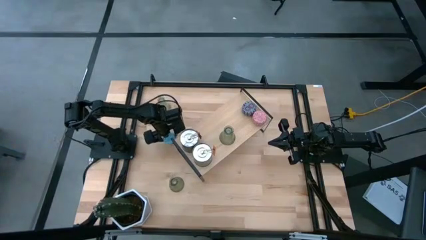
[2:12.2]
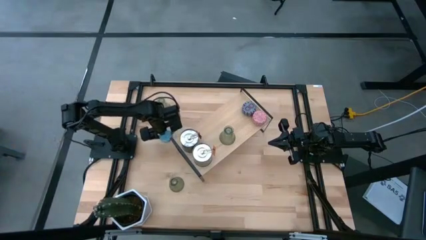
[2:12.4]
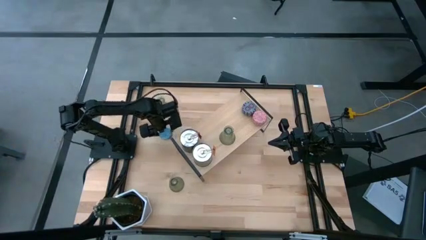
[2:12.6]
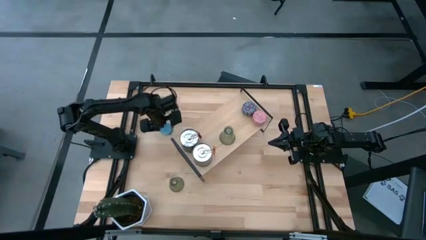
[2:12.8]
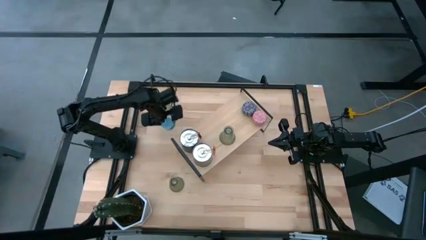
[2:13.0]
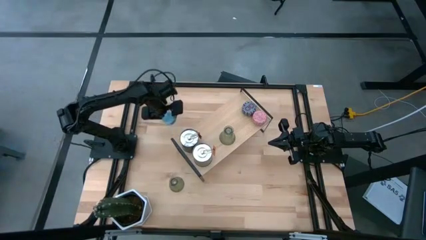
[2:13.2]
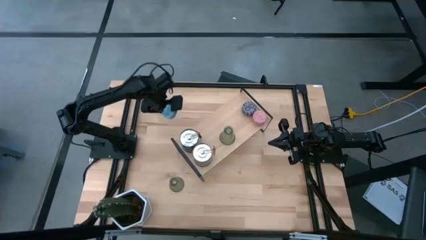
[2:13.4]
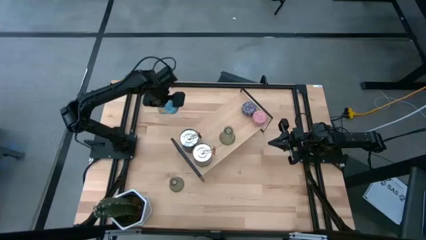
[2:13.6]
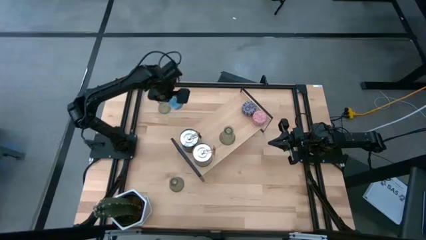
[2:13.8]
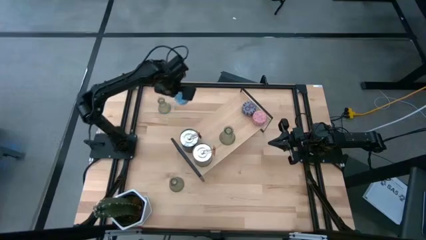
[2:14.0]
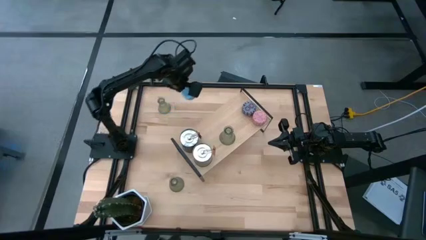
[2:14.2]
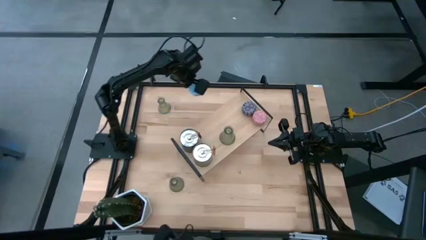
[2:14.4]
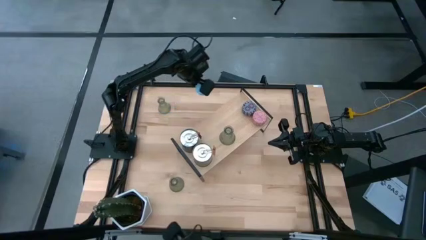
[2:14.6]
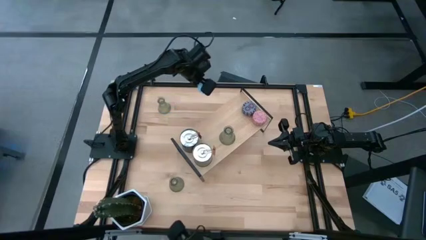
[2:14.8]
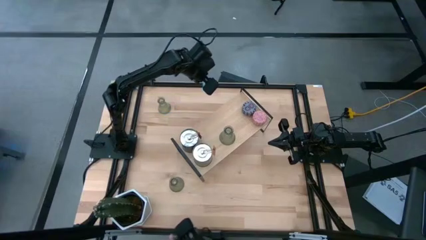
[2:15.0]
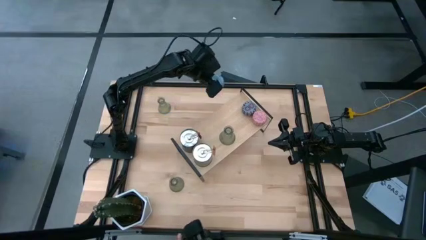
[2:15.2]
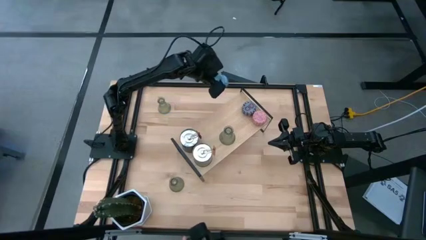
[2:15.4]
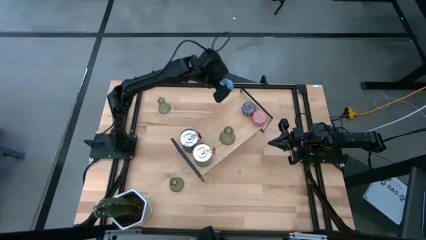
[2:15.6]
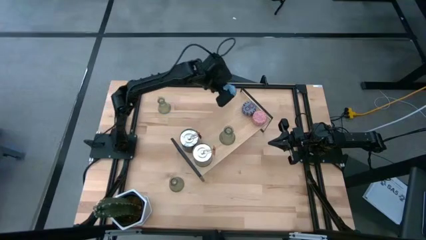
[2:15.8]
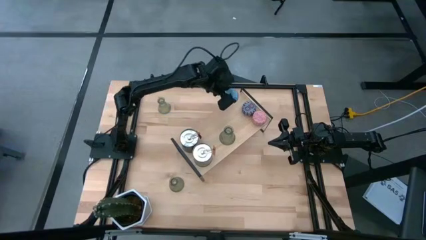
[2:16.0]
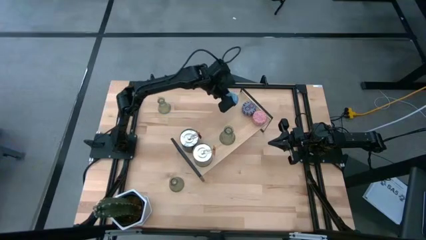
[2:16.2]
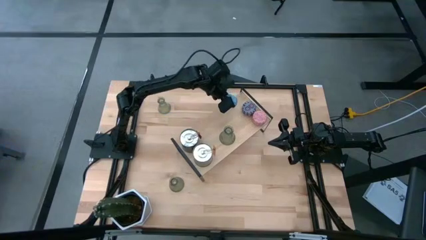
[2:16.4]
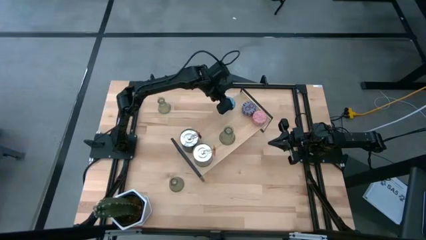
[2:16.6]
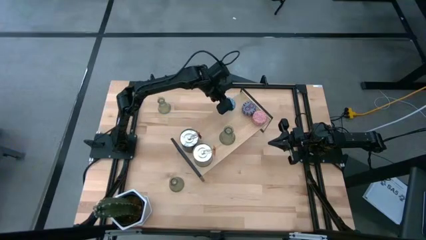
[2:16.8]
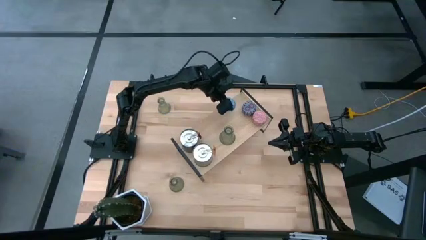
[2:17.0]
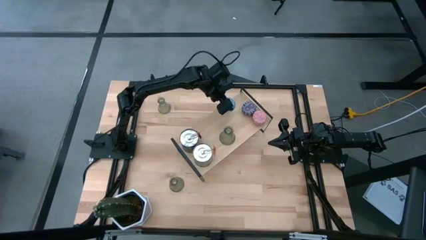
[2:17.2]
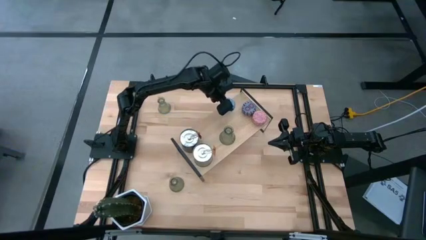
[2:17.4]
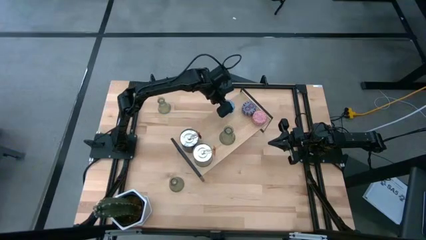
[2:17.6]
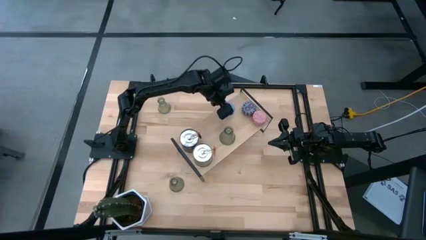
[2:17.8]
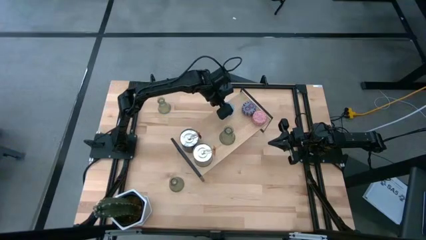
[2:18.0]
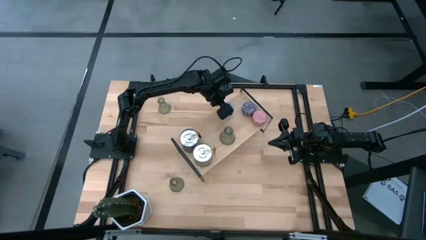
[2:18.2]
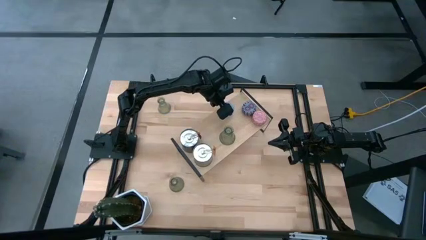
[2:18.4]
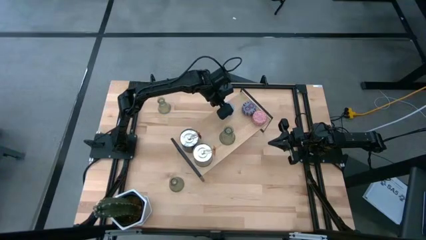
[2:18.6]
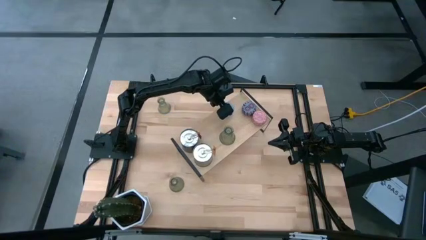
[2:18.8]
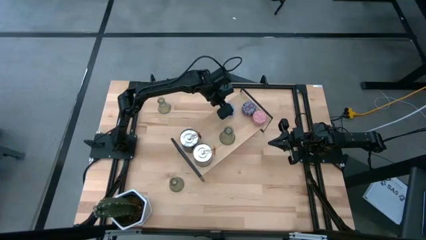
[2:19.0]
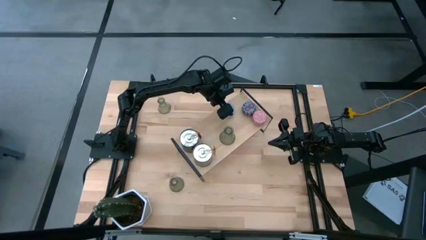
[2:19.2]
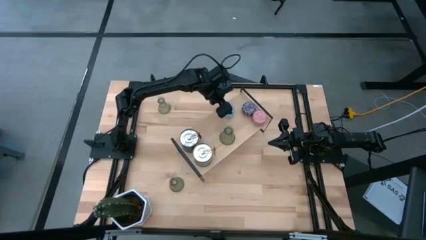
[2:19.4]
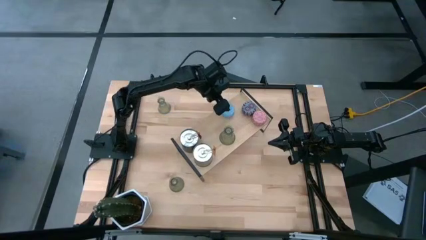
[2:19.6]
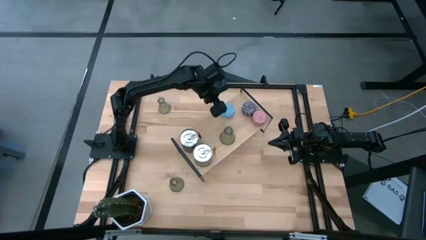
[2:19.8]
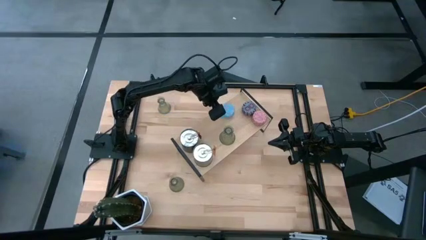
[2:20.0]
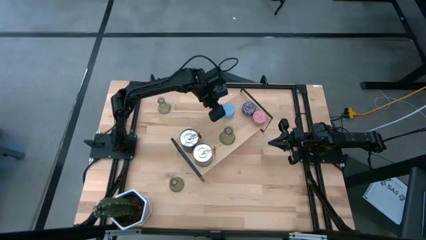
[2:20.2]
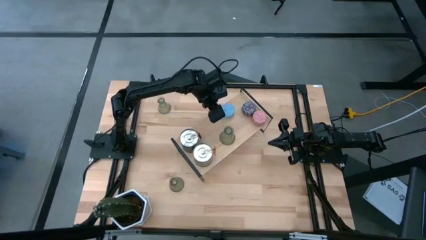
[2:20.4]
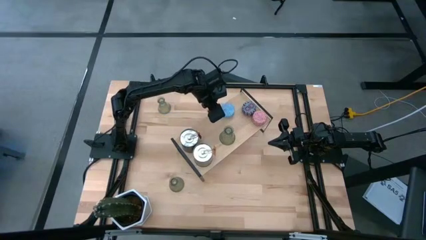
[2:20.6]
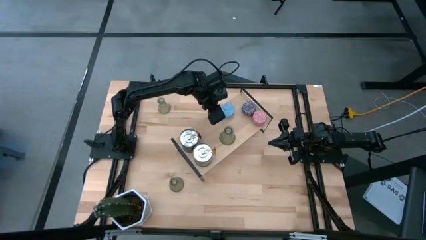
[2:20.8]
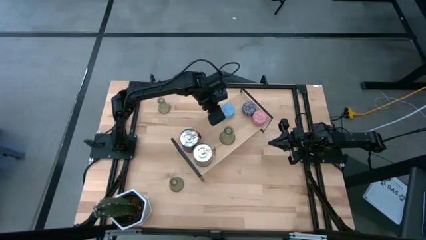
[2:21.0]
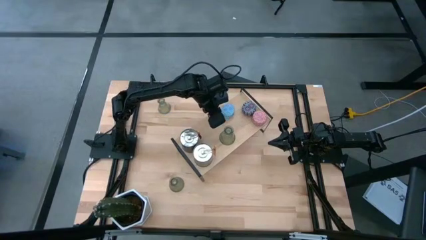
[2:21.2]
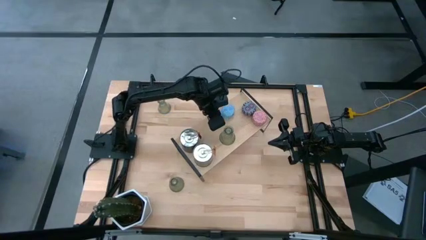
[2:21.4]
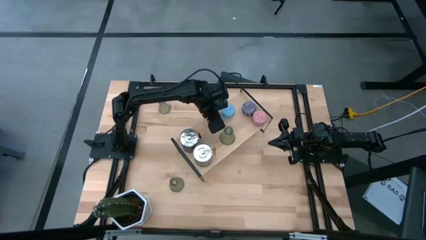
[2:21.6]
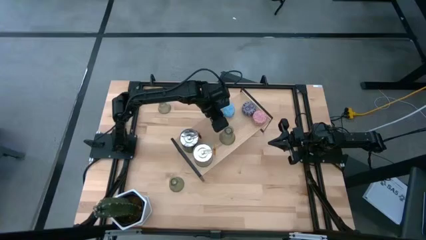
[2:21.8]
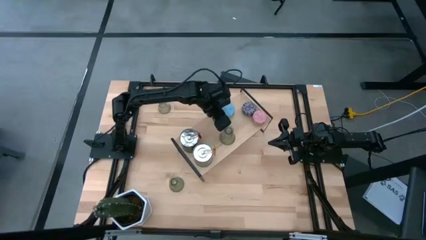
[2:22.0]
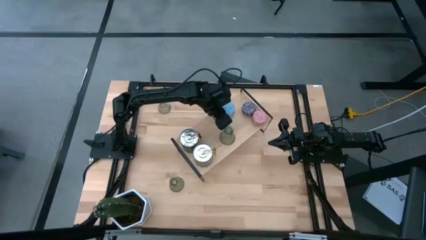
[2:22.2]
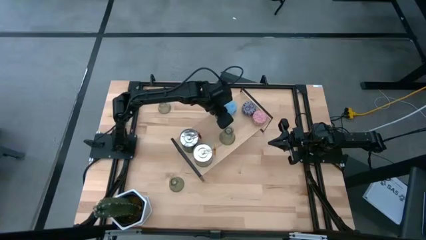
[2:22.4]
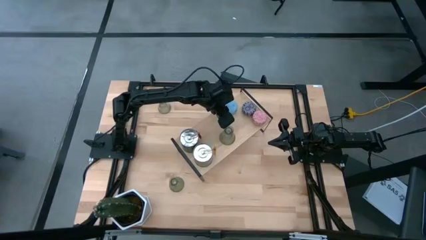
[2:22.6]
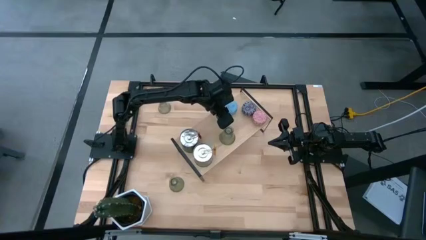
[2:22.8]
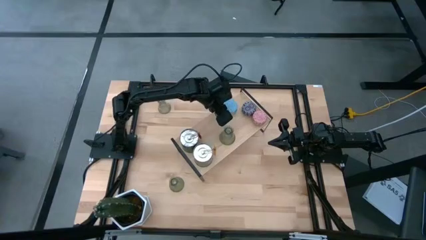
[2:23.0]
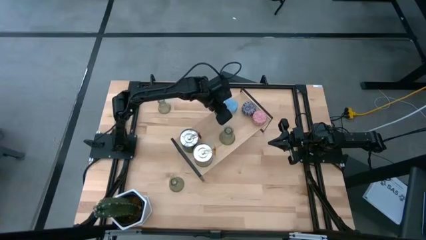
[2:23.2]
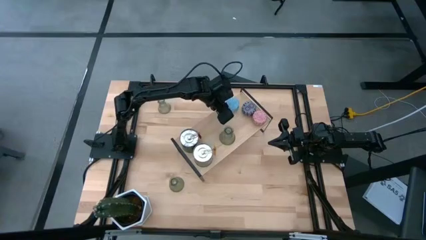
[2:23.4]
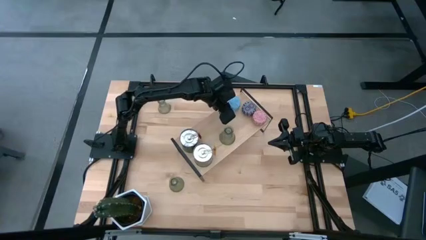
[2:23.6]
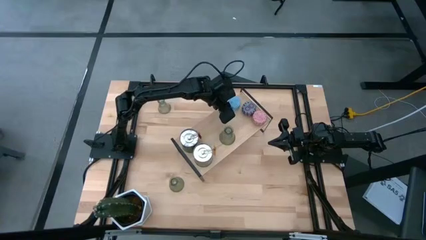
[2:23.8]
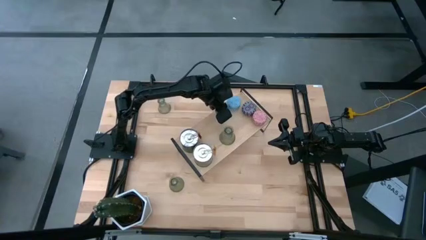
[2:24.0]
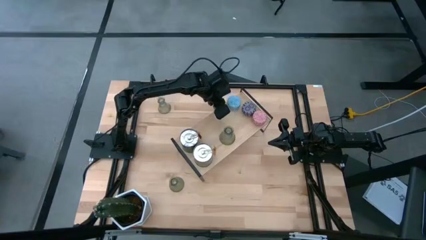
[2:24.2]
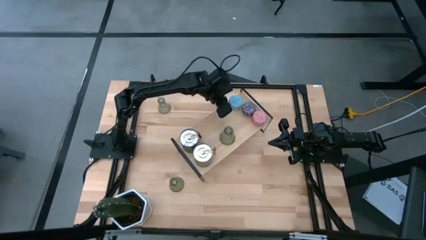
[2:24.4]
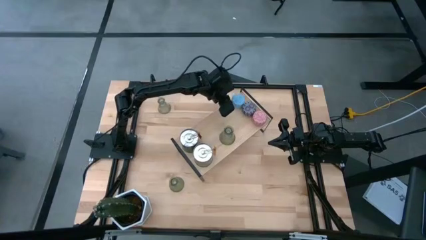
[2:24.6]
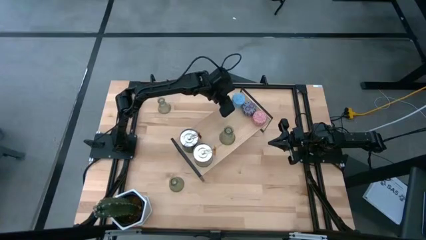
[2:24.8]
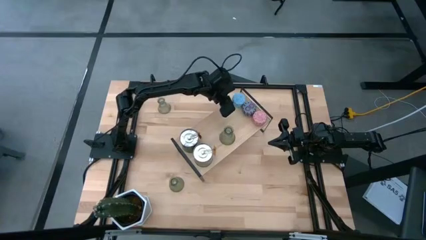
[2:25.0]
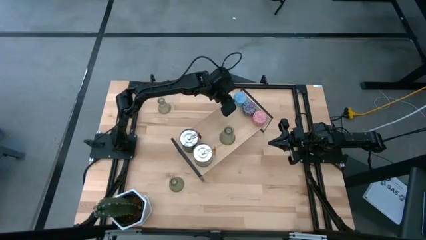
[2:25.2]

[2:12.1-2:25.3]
Task: Pick & Place candle stick holders
Put the blue patterned scented candle on the shelf

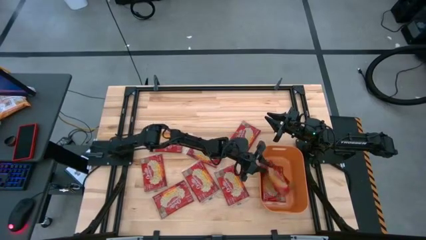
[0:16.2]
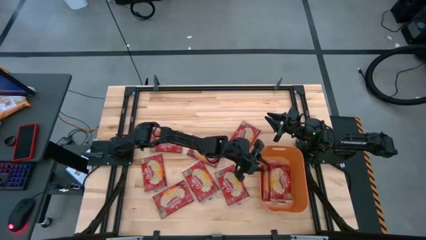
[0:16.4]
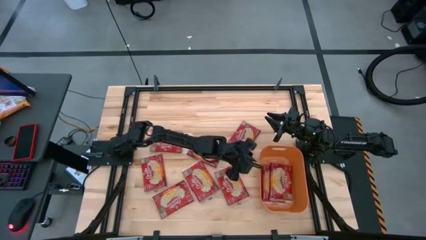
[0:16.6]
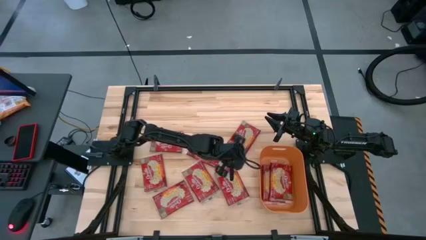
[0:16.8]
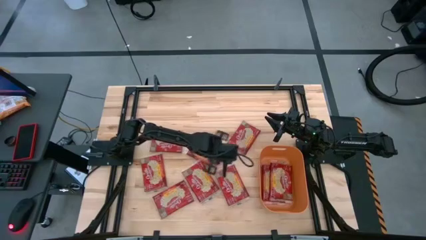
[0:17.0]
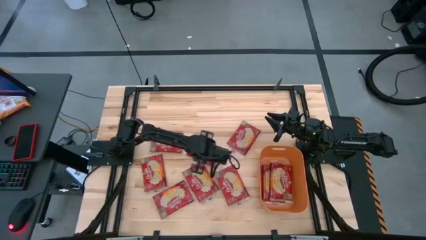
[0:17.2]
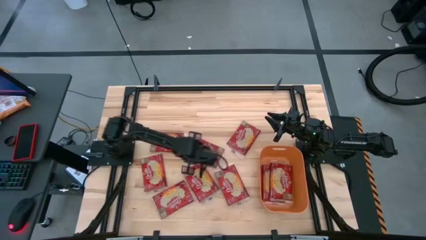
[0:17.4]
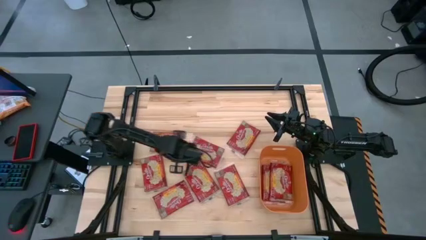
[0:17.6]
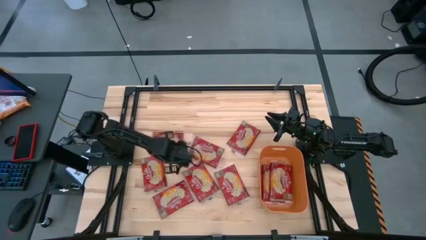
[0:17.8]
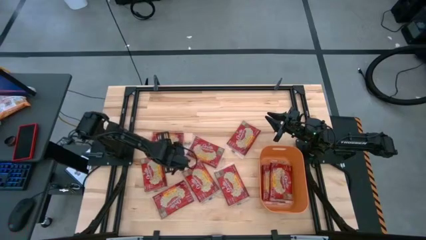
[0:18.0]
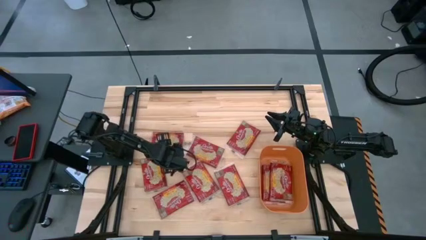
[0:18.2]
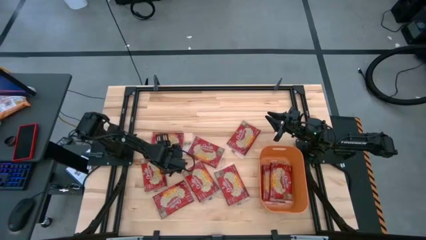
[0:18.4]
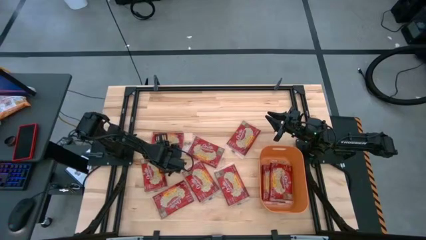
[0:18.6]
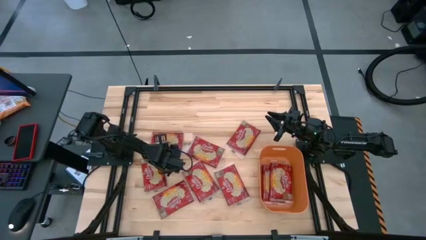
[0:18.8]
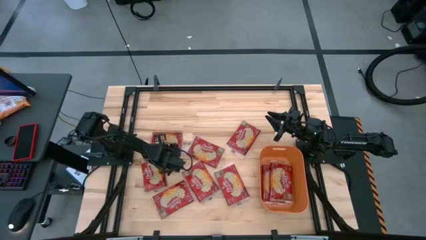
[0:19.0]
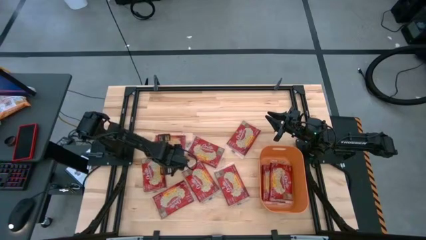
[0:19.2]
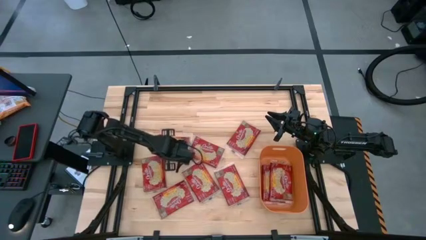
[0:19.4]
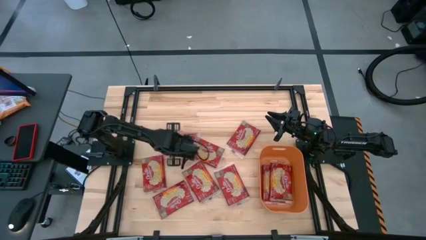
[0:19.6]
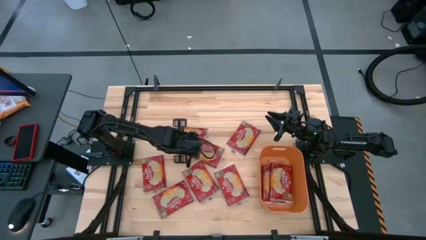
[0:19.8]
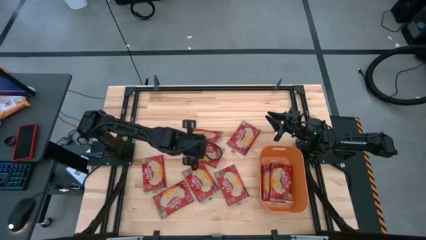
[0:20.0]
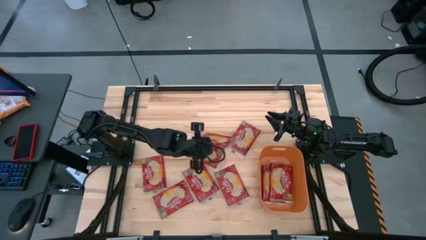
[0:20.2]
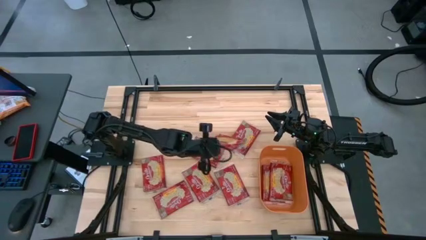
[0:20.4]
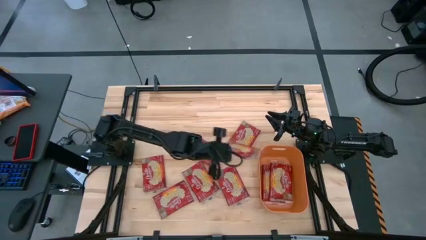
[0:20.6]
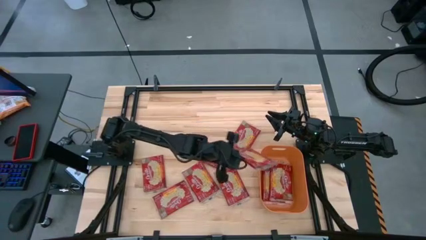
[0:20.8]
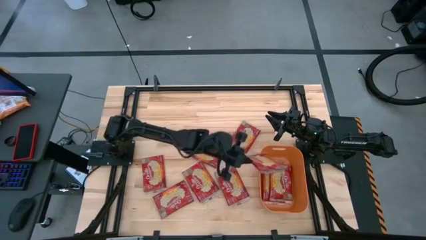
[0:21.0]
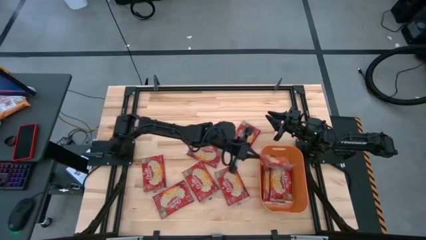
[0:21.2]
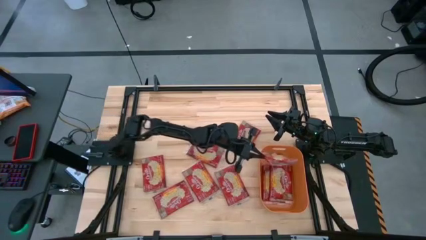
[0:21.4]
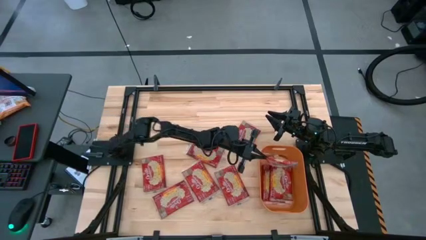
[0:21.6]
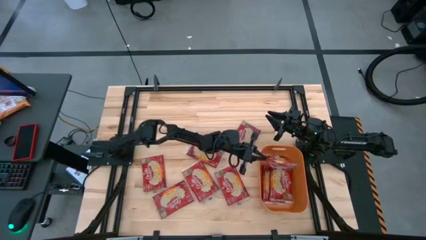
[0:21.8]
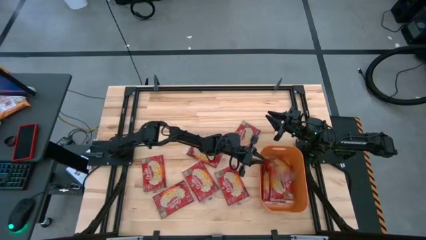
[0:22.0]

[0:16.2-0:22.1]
Task: Sort popcorn bags into baskets
Put the red popcorn bag into the orange bin
